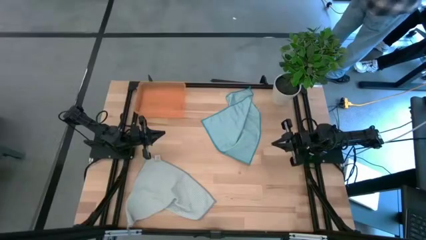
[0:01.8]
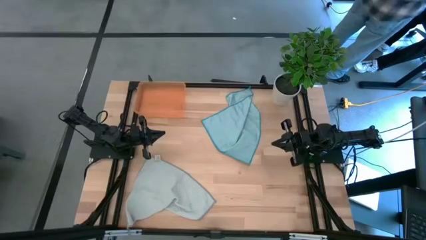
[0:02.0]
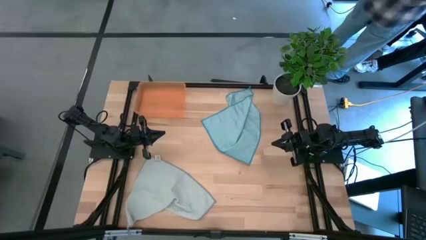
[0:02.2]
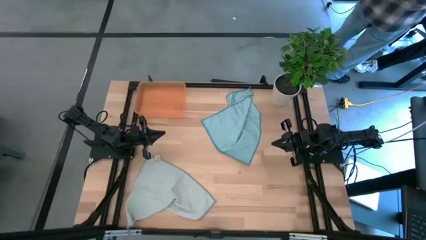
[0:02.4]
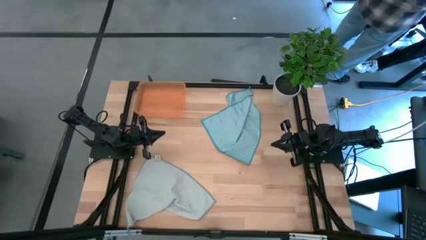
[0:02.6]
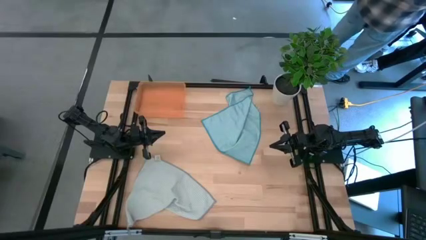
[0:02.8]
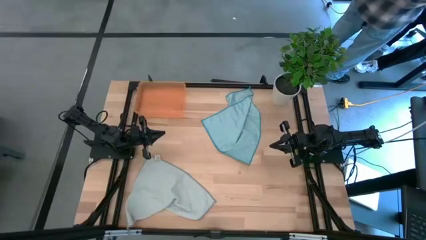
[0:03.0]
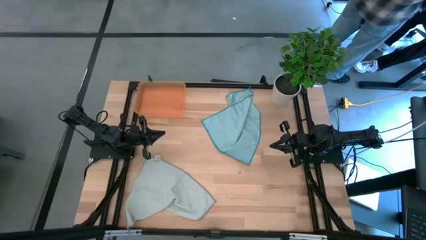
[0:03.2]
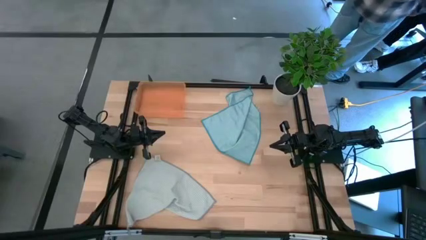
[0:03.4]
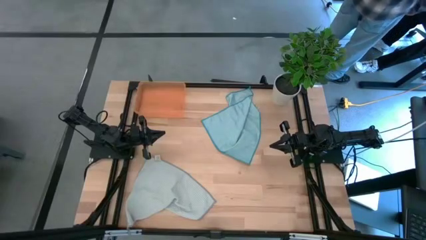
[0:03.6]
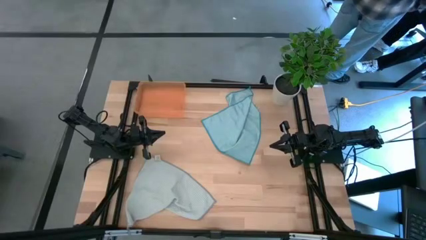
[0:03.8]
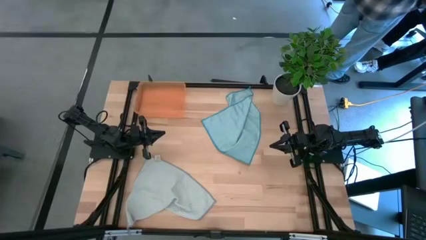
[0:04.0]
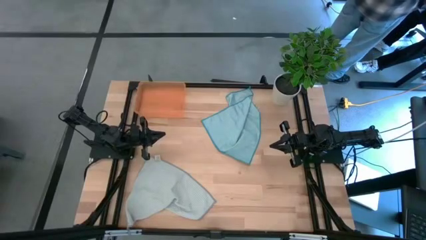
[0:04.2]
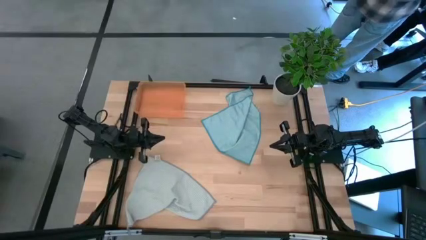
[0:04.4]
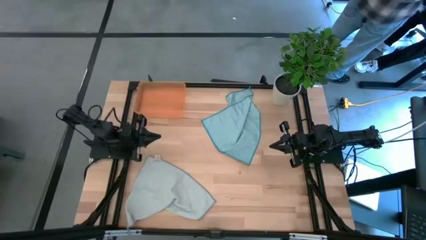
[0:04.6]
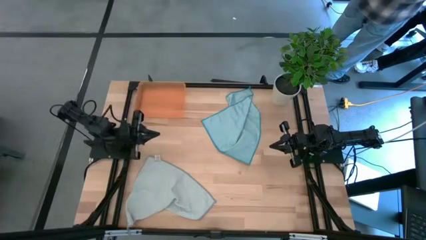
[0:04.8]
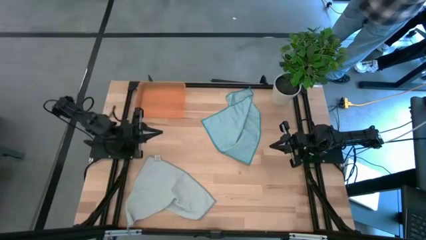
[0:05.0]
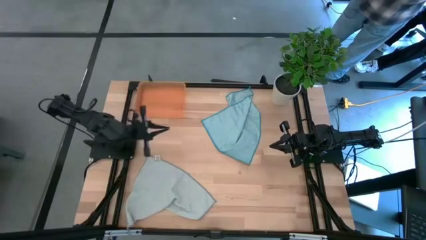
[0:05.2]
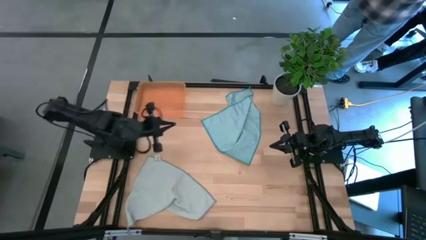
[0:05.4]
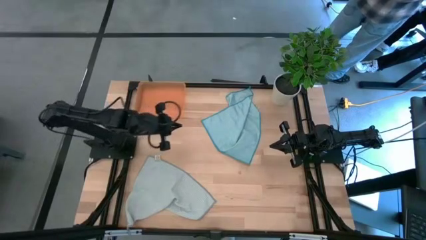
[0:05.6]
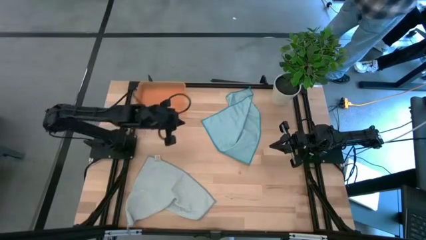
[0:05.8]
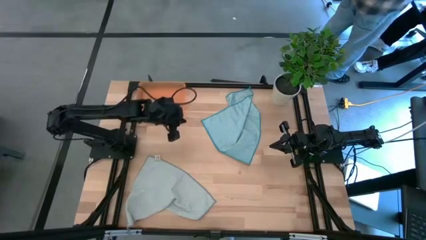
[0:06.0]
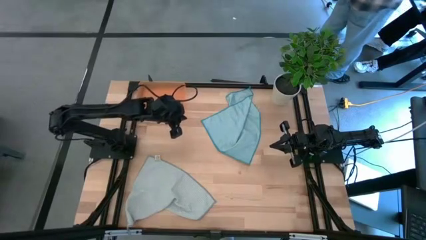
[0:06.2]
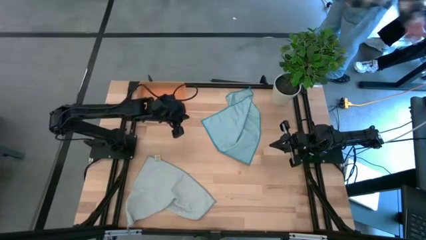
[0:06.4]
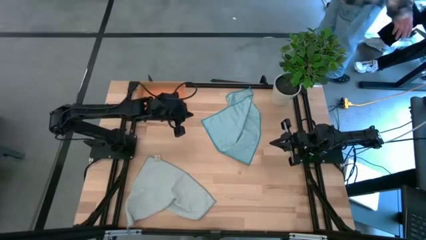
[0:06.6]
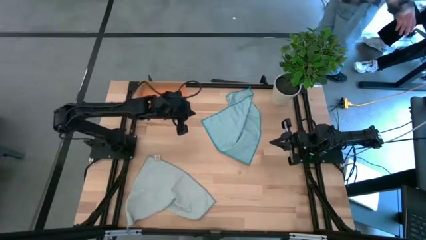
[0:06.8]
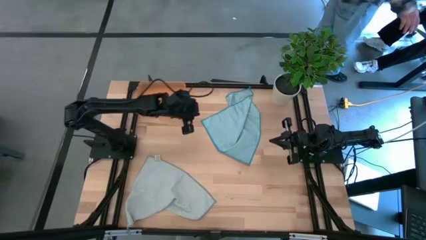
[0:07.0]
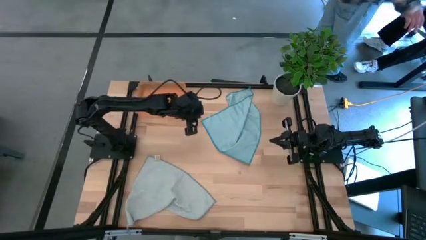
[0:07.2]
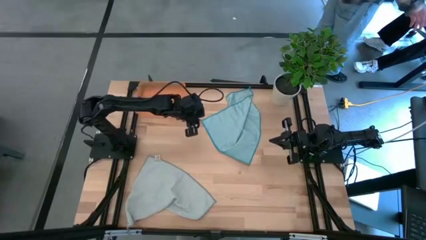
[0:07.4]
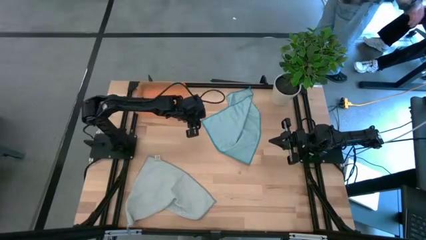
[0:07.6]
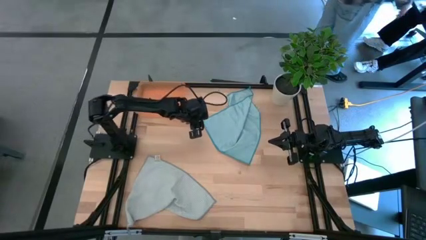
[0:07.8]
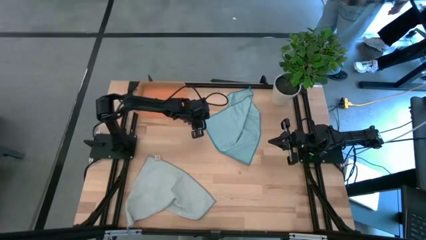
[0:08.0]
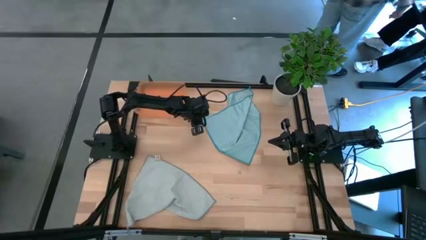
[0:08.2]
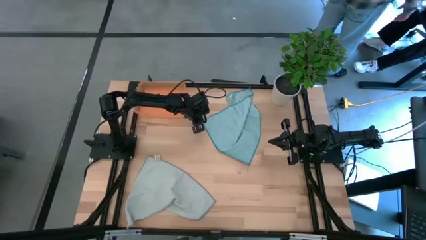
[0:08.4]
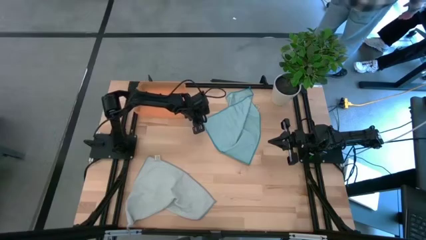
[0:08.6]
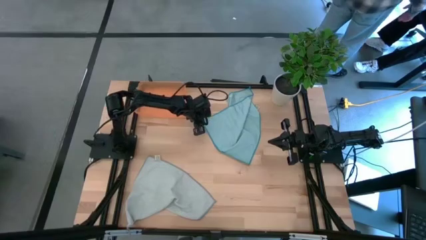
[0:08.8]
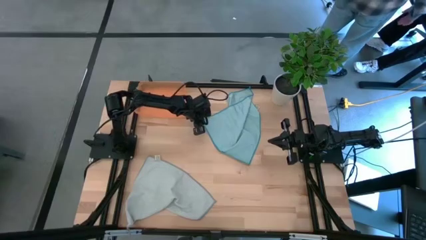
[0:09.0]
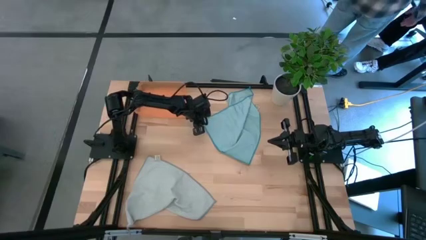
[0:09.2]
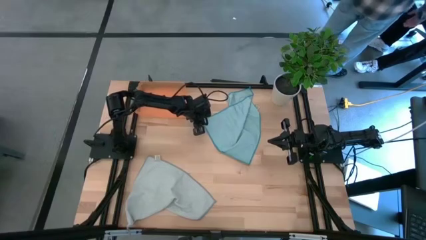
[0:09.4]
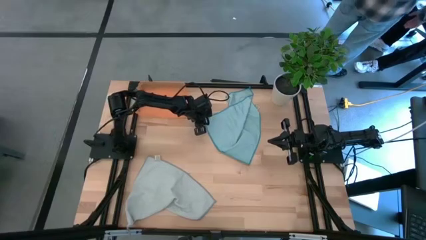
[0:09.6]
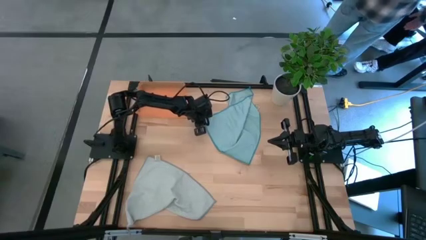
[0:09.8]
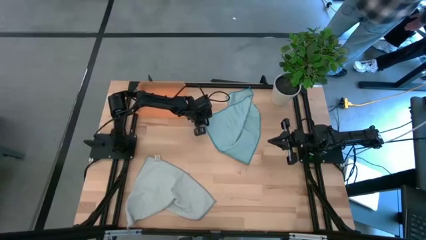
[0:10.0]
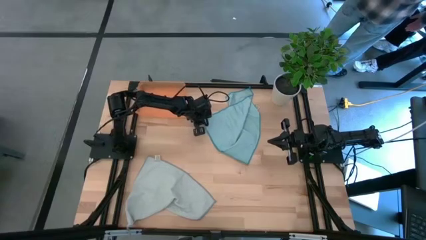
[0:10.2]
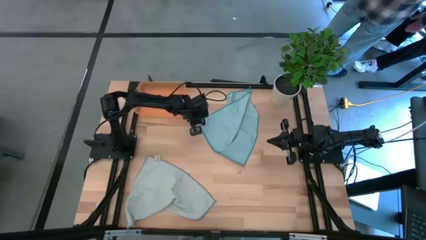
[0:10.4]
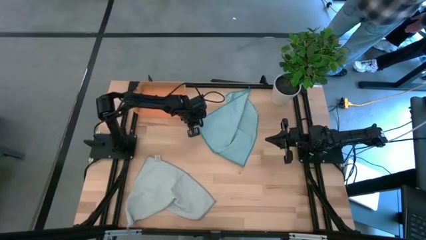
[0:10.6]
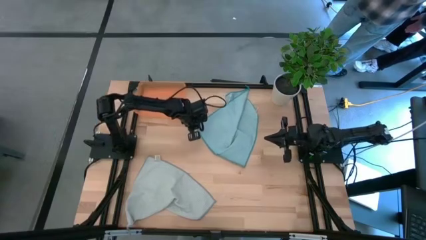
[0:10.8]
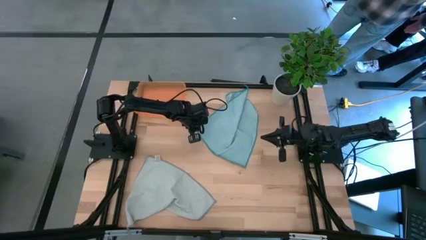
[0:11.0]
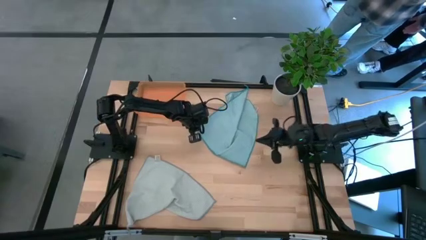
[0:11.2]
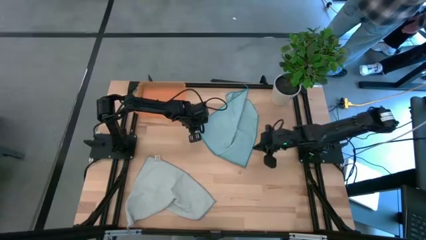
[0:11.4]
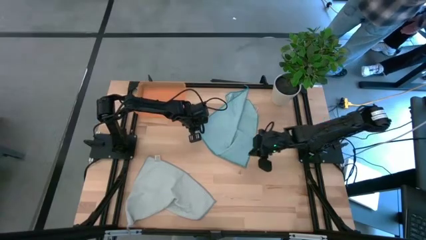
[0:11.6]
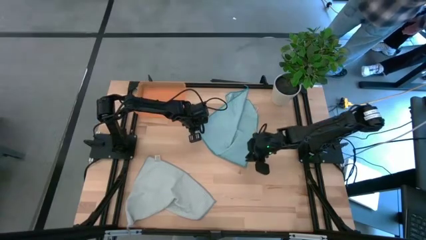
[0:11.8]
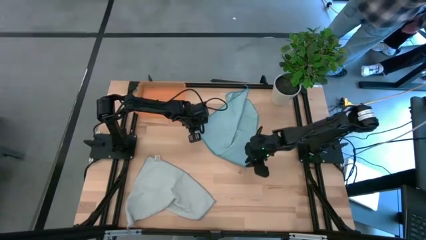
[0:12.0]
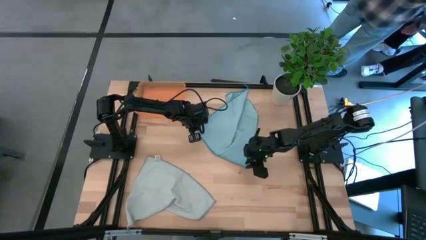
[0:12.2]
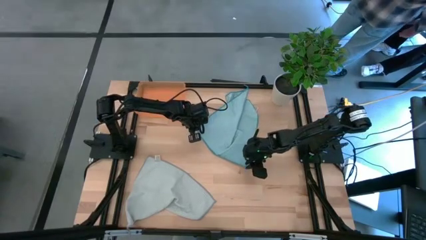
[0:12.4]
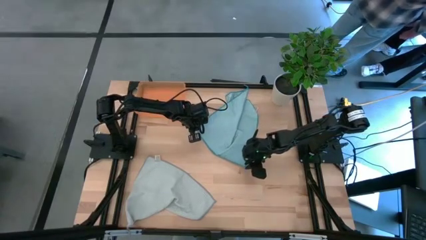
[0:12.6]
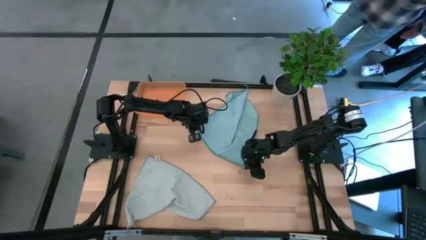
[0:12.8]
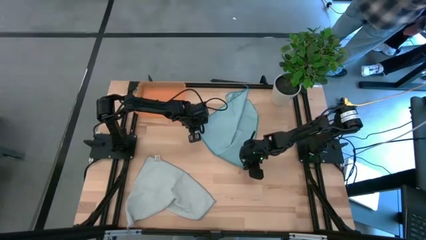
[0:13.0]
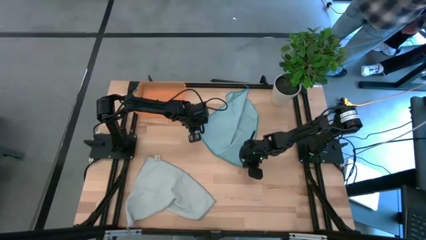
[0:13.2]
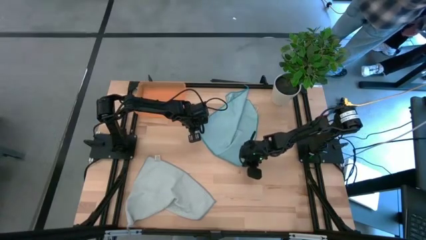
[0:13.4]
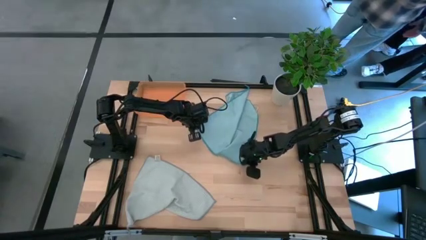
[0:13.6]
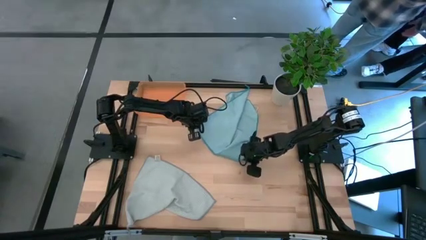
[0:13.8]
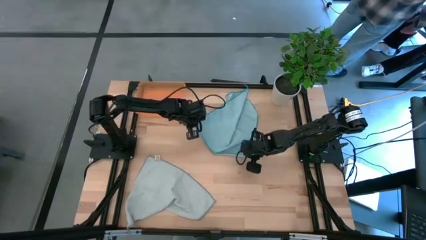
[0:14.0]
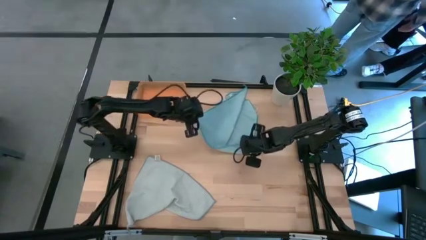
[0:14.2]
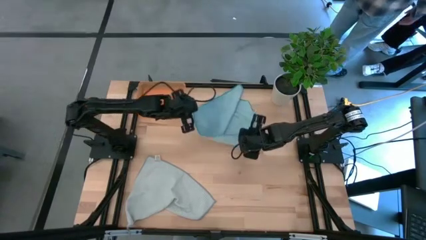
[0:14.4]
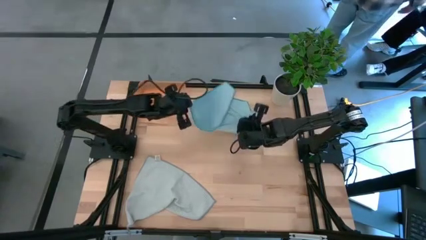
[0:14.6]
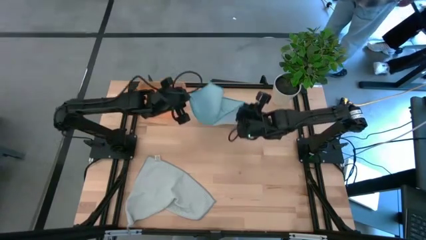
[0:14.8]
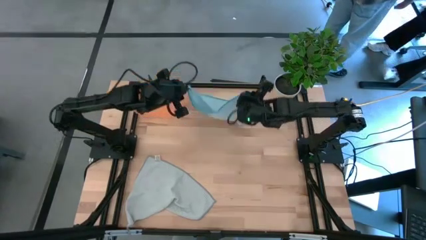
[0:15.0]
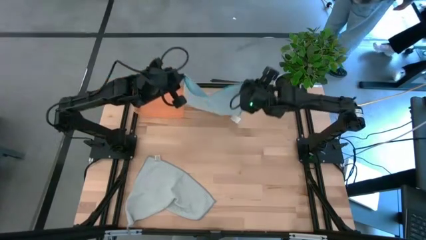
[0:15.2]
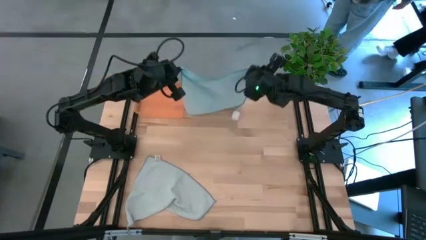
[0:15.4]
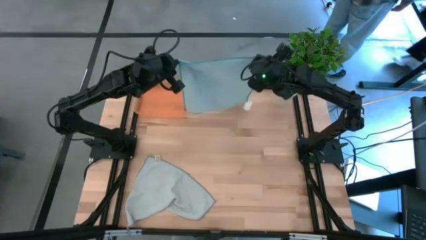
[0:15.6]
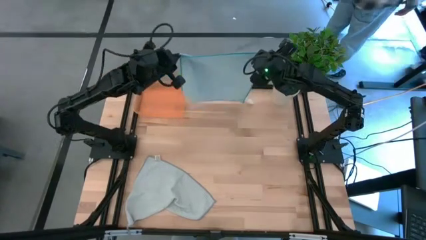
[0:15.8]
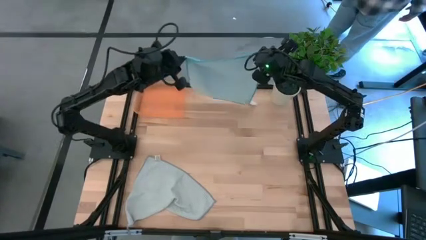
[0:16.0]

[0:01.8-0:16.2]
Task: Roll microfiber towels into tight, uniform cylinder then place into a basket
Fold the blue microfiber cloth
